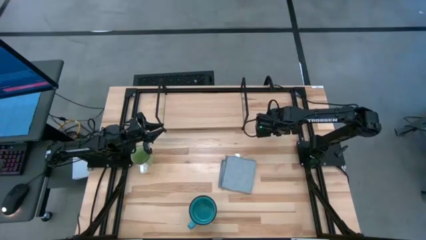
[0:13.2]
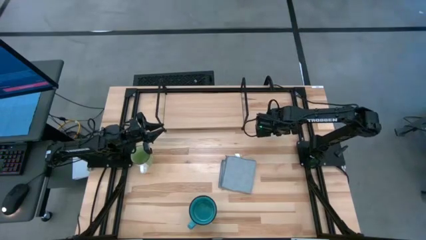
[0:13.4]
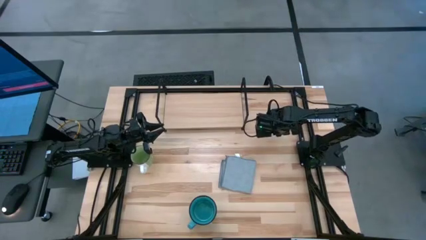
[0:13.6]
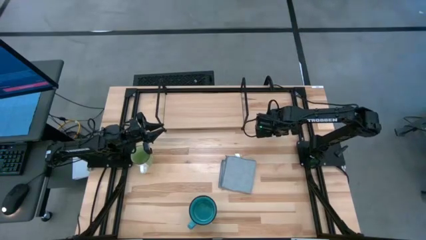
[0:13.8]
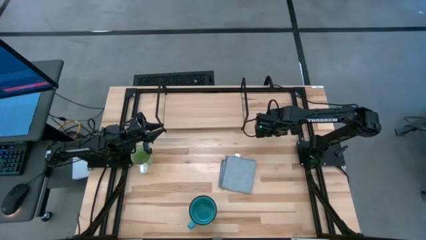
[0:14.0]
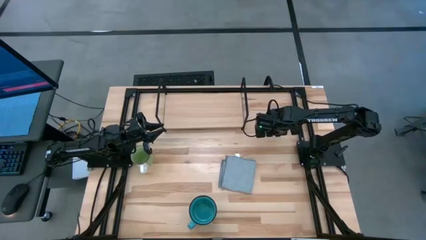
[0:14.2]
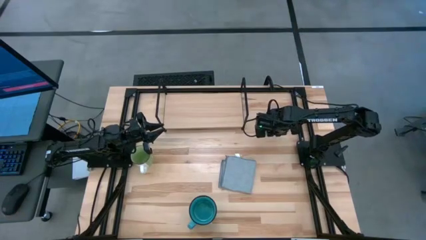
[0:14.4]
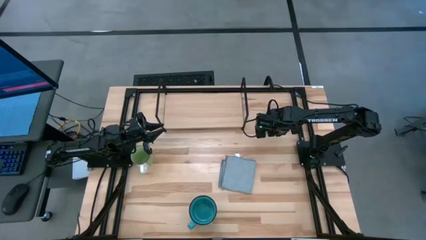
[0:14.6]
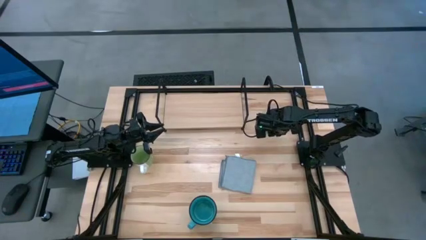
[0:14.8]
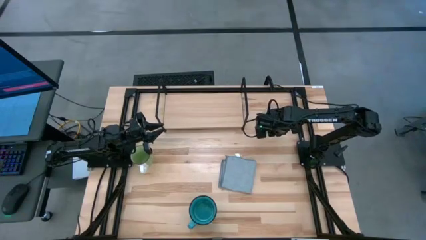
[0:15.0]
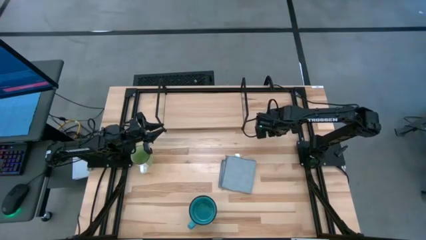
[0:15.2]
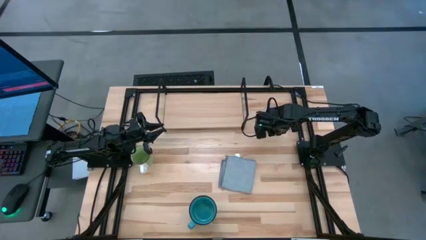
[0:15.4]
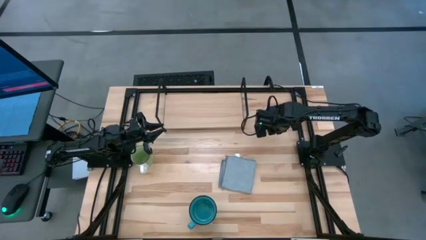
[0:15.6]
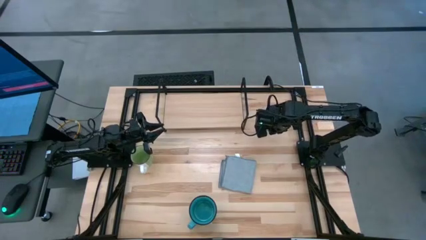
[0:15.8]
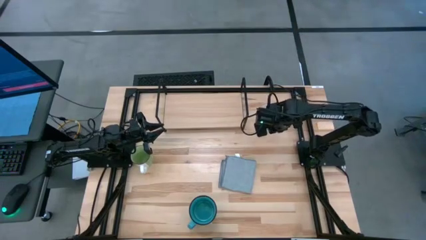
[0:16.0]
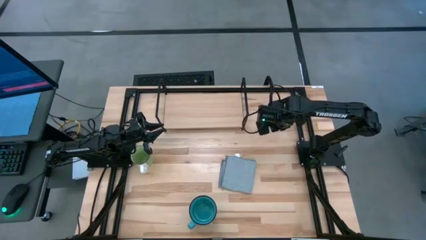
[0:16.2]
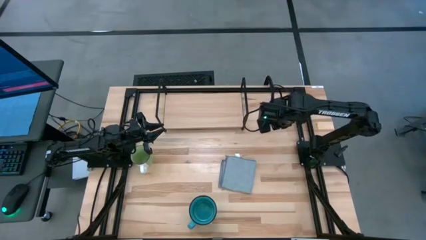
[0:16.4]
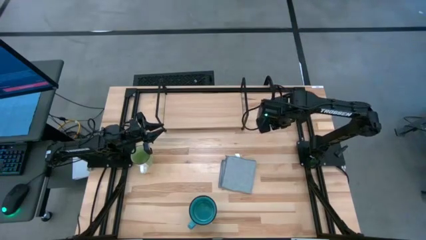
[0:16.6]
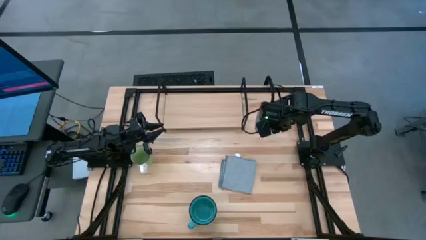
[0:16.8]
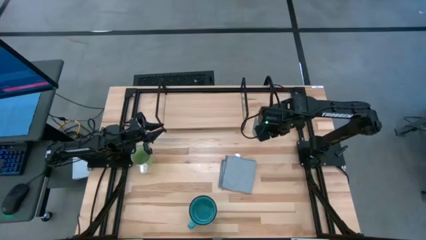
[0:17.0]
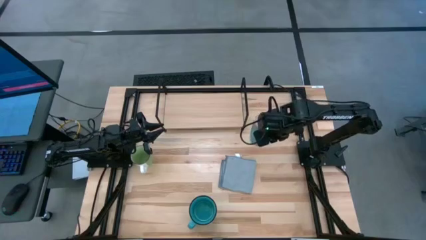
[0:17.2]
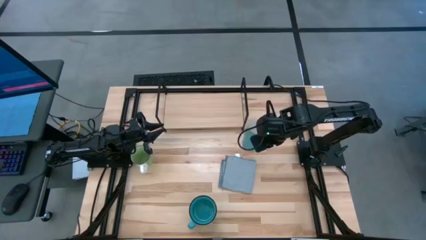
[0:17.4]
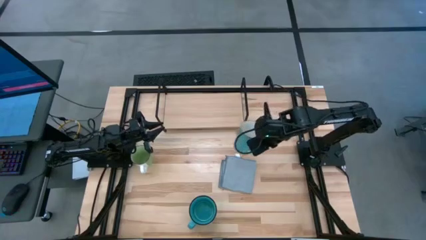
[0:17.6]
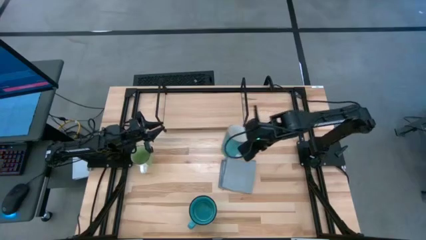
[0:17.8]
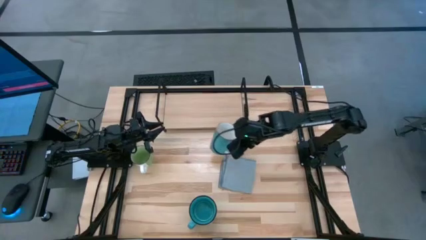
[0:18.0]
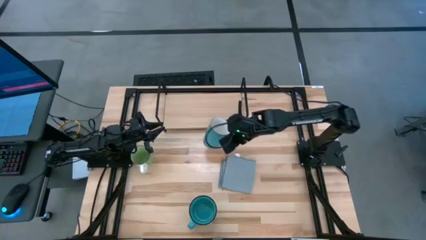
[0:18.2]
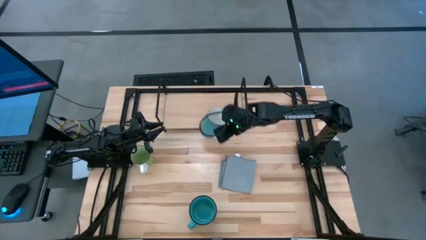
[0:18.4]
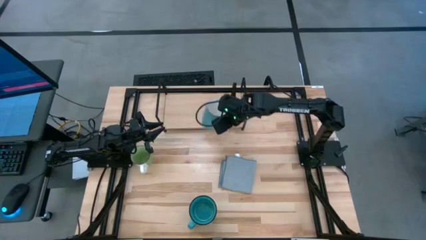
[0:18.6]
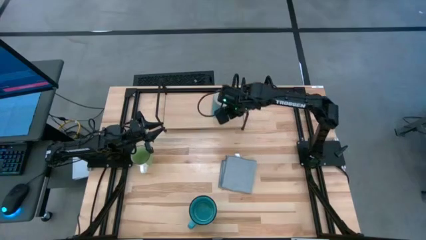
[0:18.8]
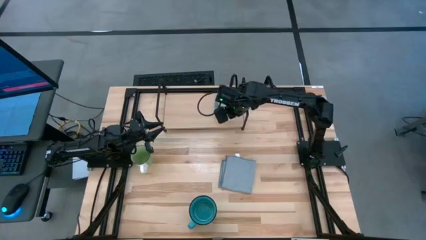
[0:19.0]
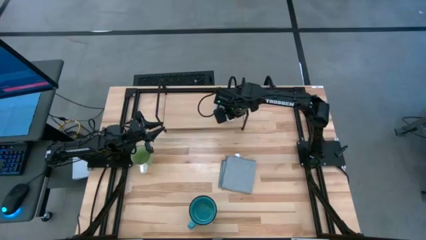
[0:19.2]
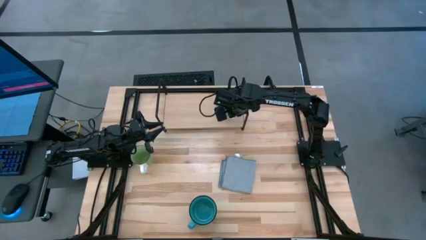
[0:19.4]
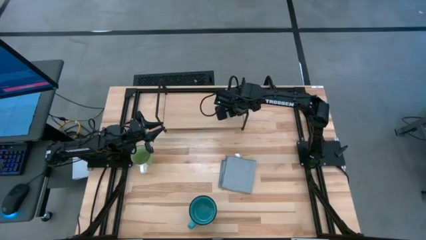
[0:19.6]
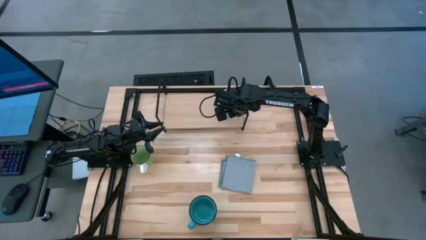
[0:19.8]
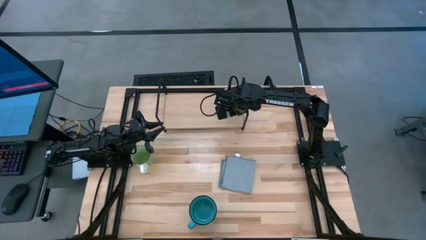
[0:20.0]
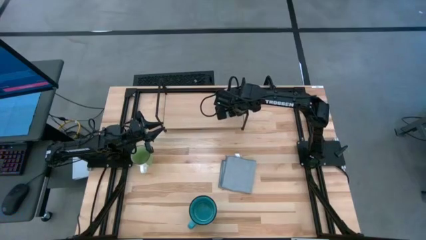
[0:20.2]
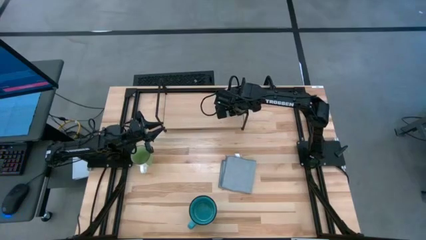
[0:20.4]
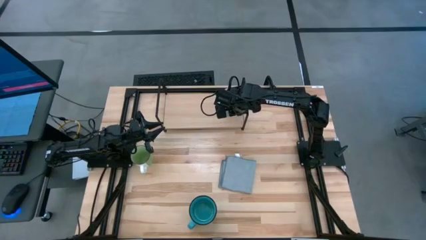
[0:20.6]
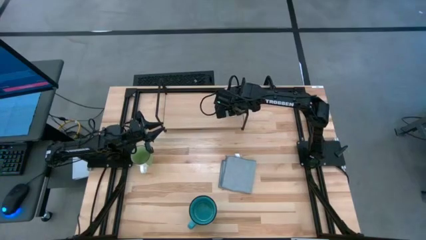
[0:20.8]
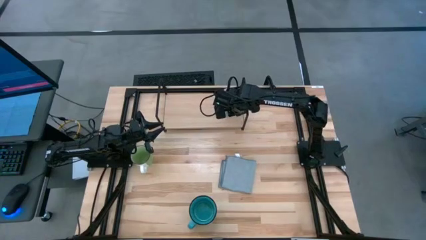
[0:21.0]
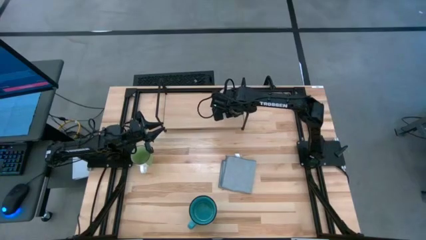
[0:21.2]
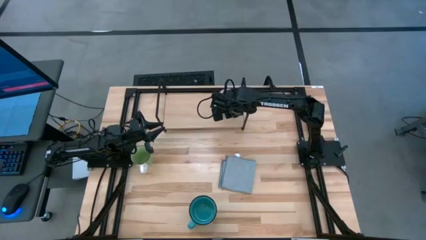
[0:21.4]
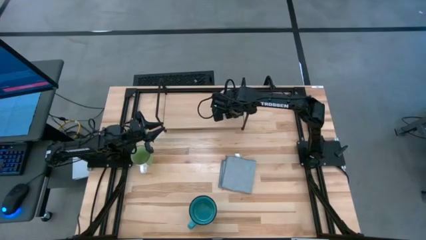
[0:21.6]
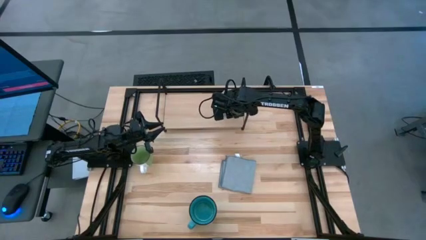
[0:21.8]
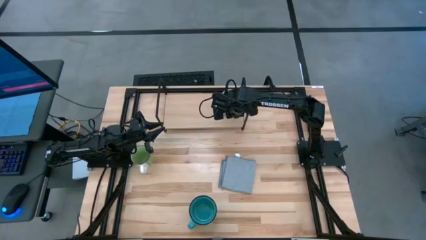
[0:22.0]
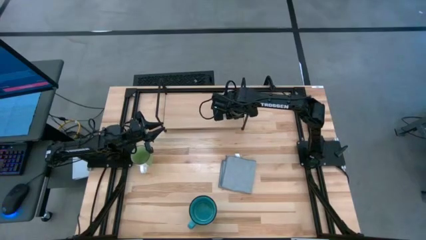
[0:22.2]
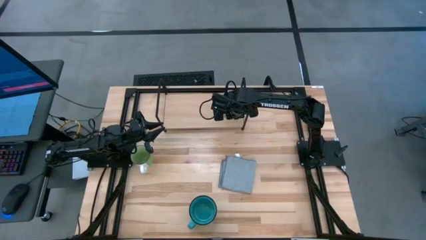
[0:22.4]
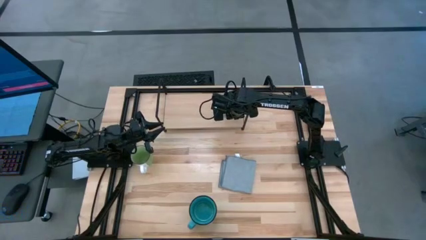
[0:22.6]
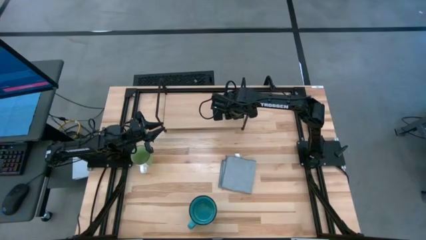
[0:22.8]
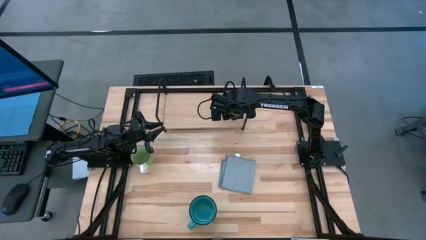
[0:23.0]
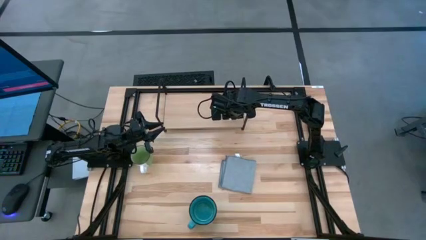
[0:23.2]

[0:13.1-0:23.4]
Task: Stack small to large cups/mugs on shelf
Put the white mug on the shelf

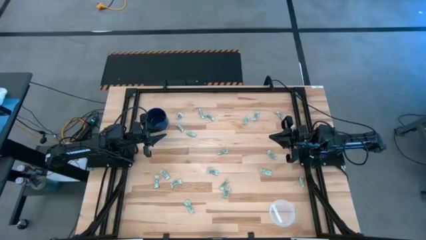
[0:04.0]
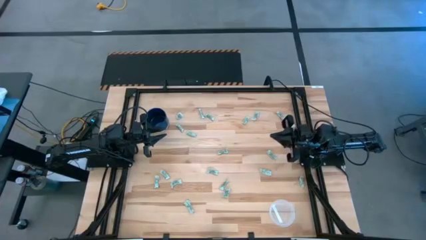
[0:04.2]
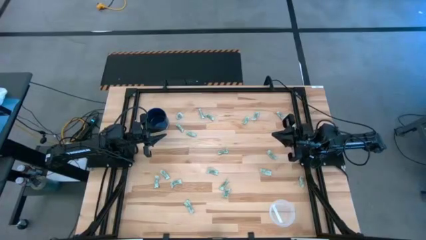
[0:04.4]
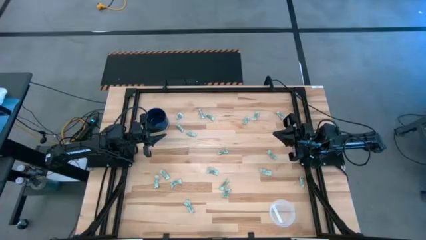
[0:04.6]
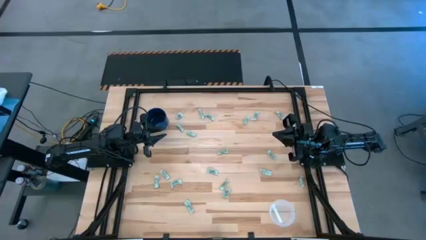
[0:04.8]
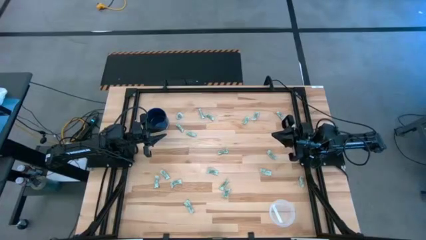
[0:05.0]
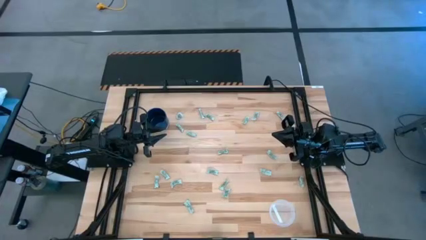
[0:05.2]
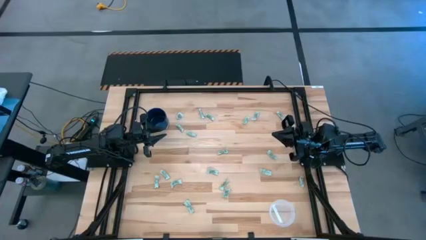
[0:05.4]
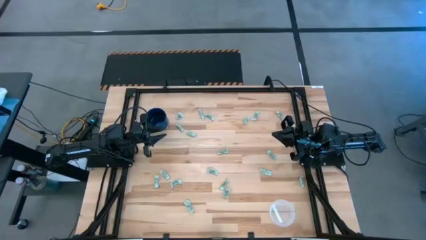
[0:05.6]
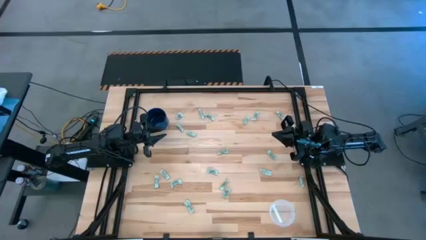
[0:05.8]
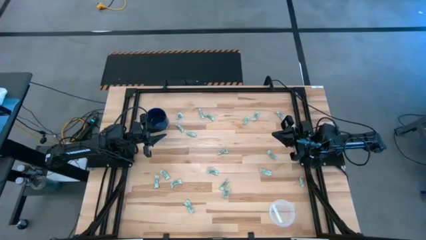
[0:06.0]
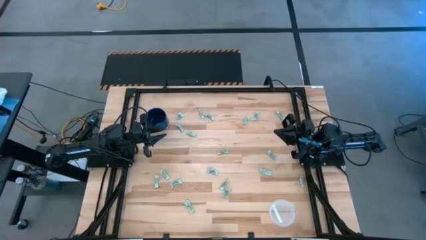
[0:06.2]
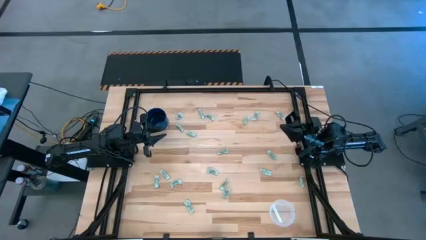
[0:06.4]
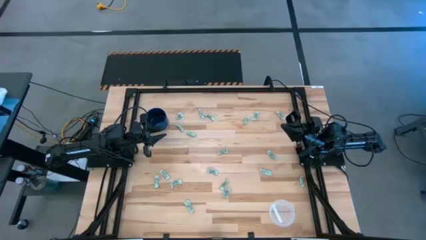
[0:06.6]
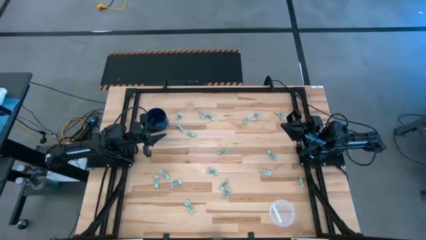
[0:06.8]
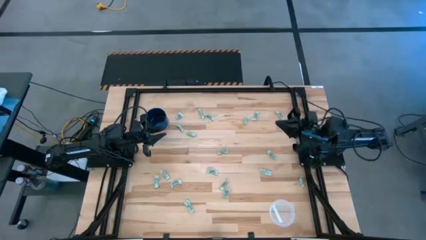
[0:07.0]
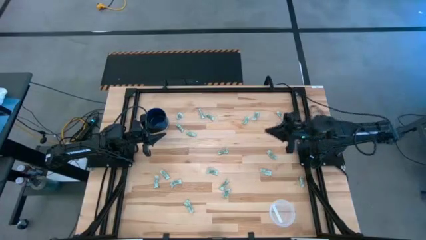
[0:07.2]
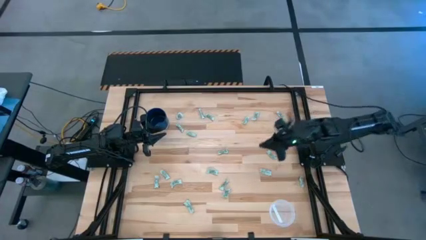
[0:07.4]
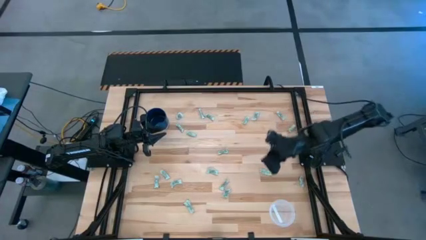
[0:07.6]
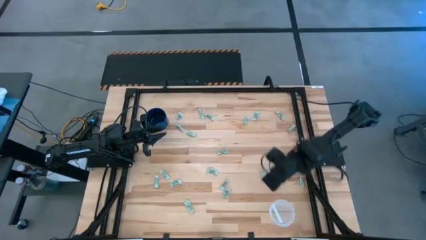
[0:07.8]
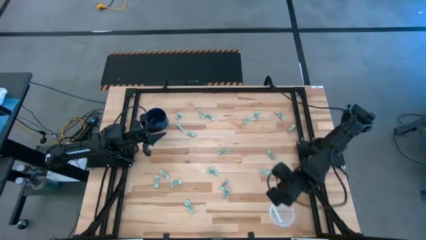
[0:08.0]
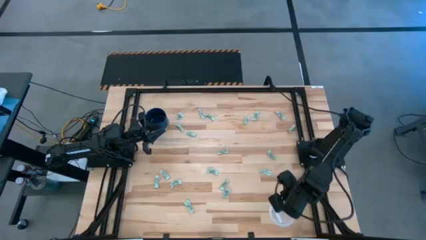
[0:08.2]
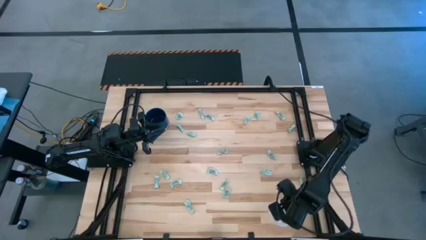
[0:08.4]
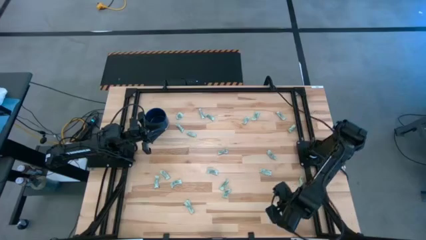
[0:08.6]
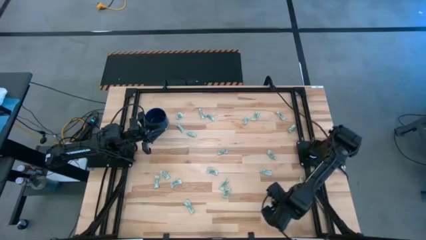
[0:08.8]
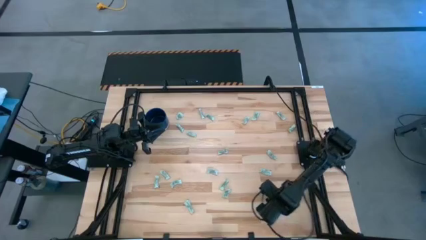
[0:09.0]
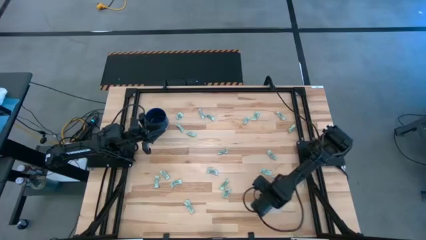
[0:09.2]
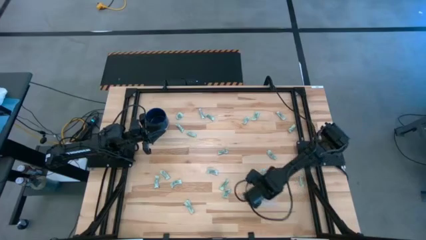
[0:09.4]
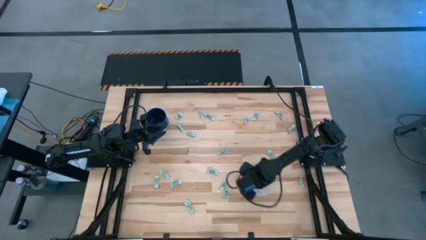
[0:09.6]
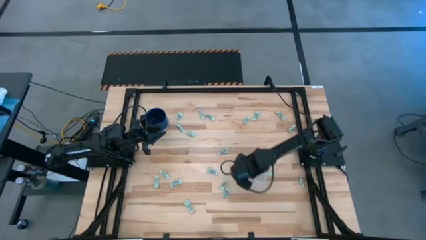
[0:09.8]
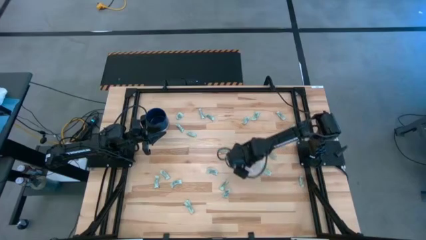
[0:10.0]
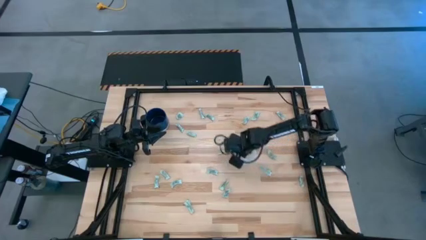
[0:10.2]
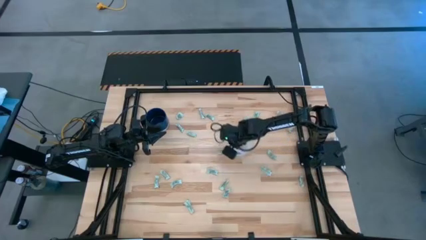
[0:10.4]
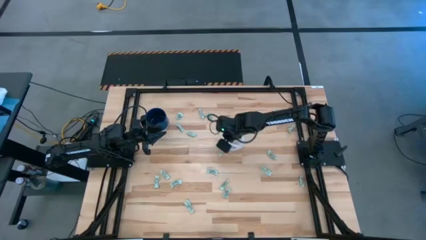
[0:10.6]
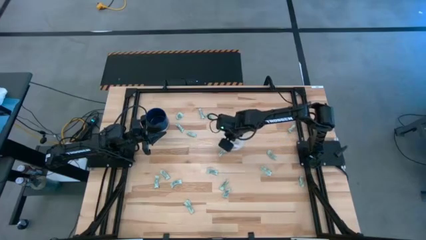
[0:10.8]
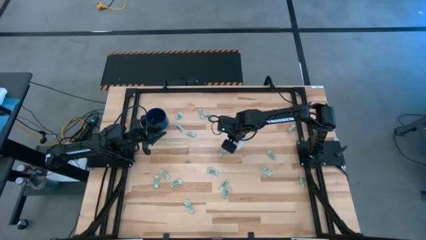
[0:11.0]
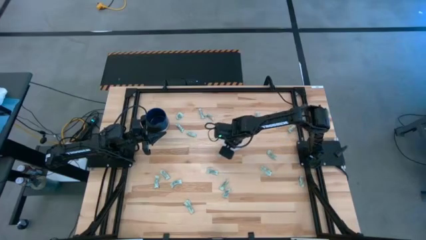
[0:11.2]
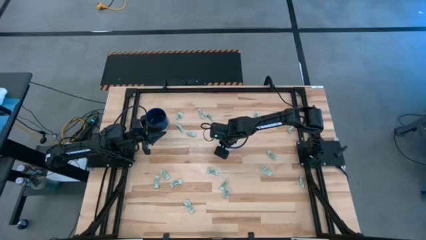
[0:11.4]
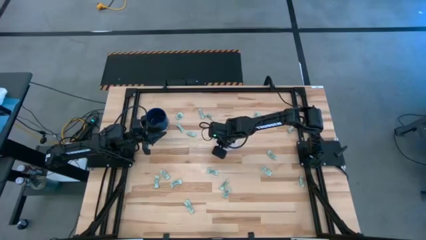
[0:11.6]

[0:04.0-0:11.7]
Task: Pick and place items into bin
Move the transparent bin to the center of the table
